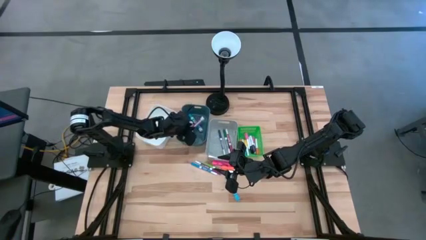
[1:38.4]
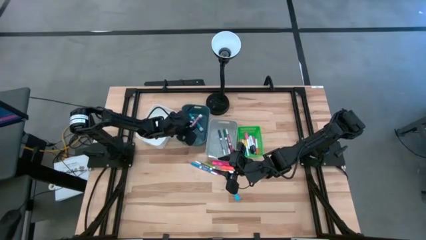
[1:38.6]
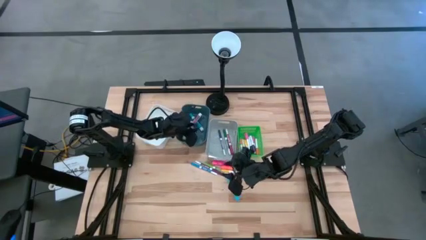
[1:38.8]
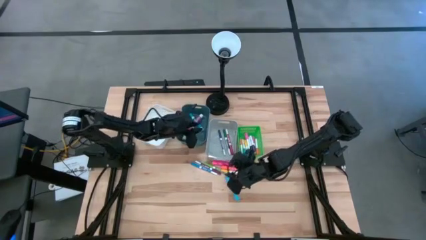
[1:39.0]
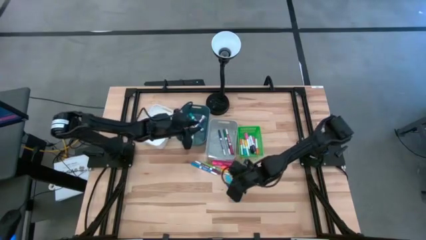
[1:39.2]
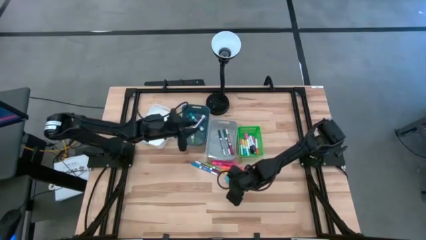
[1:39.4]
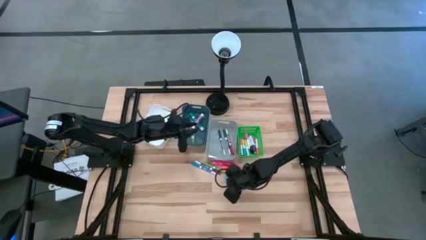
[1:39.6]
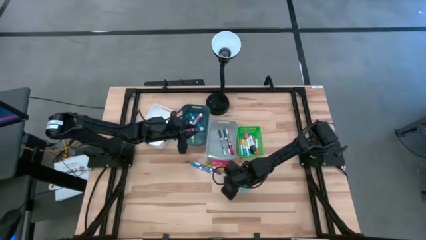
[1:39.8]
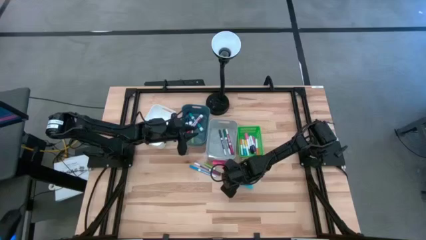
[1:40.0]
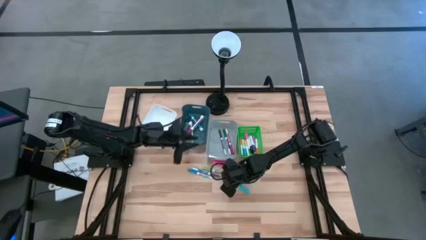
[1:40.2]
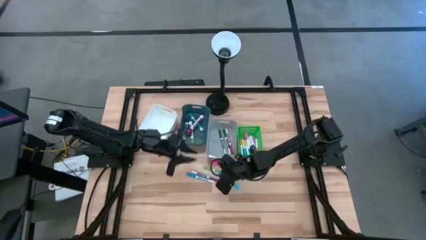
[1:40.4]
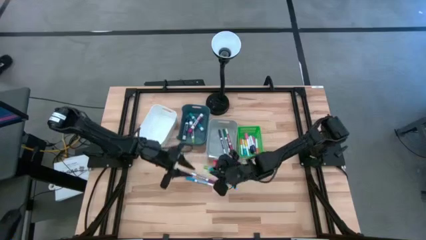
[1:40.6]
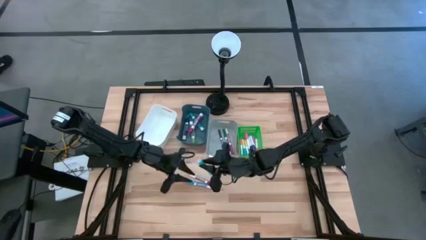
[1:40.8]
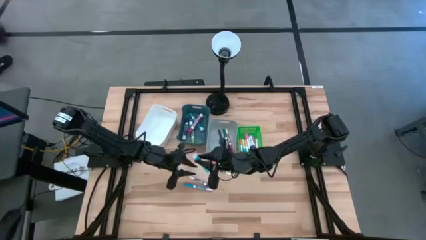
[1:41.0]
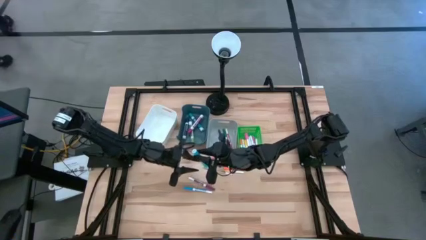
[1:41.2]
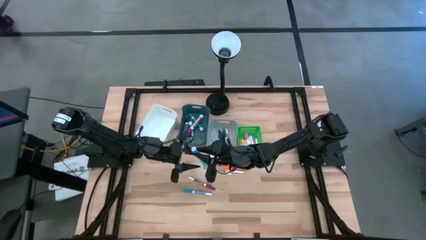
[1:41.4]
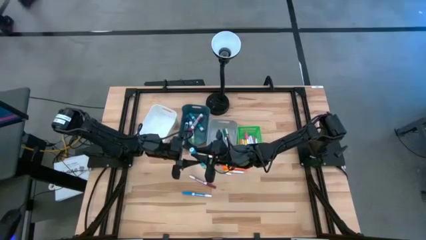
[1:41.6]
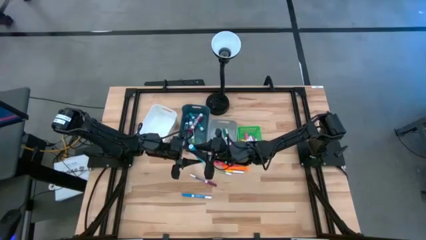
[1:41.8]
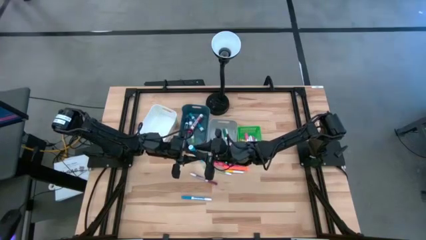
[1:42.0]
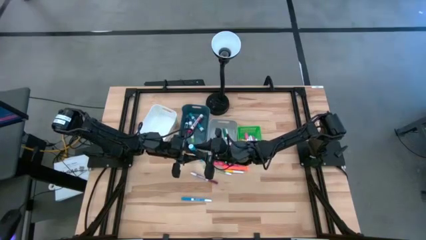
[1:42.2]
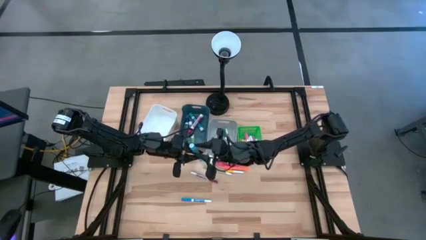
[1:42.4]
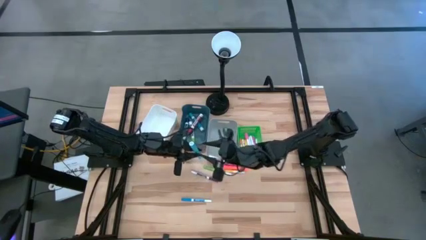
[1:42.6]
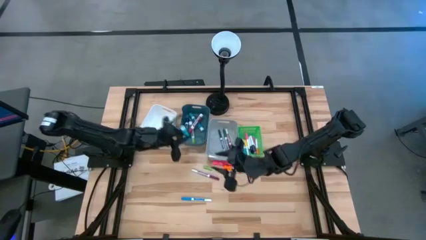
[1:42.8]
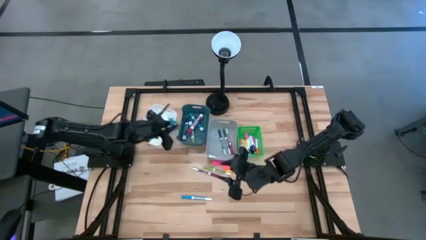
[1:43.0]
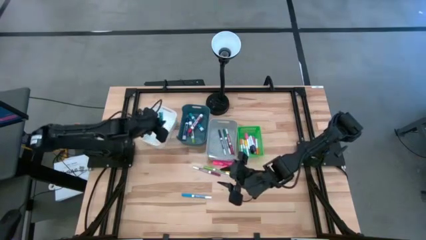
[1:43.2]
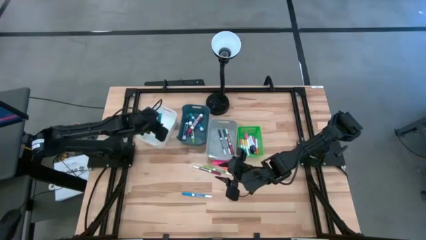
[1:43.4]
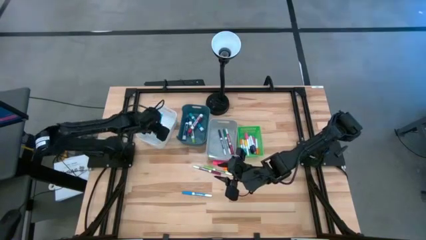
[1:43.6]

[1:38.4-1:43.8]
Task: Pick & Place Markers
Put the large blue highlighter pen into the white bin

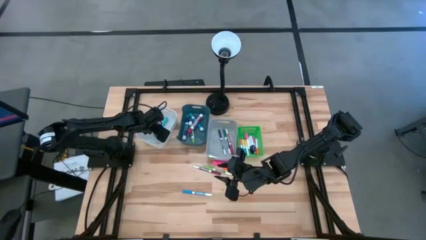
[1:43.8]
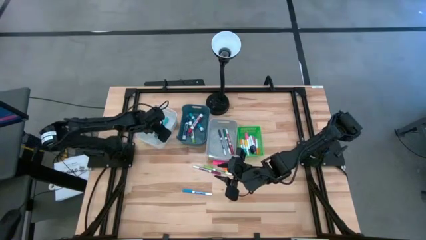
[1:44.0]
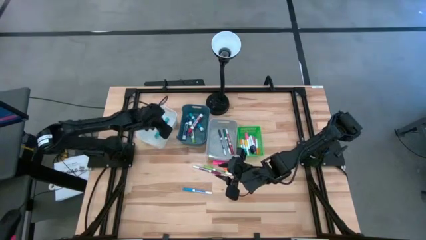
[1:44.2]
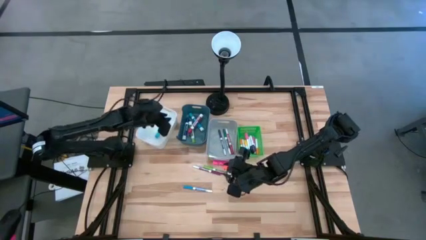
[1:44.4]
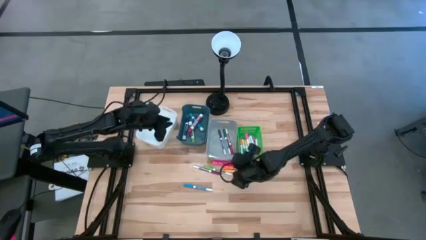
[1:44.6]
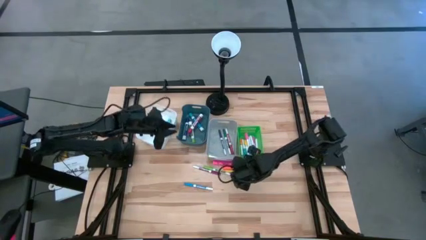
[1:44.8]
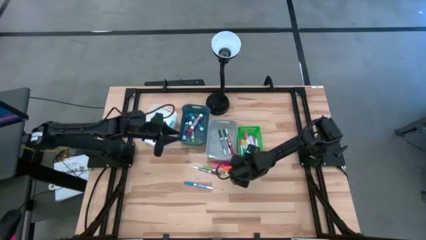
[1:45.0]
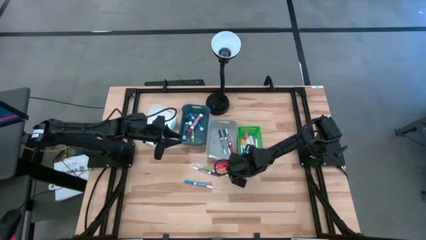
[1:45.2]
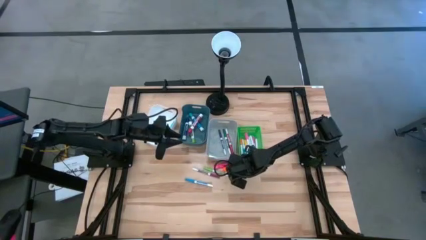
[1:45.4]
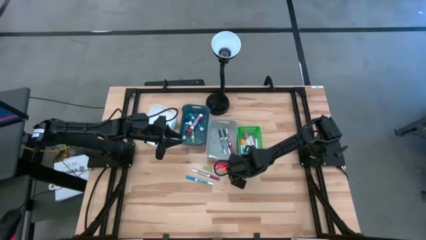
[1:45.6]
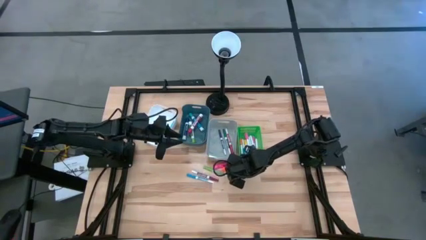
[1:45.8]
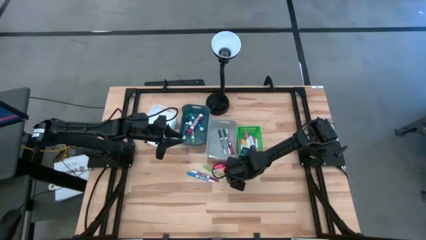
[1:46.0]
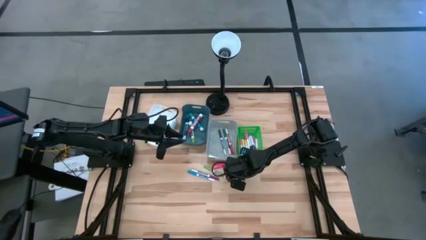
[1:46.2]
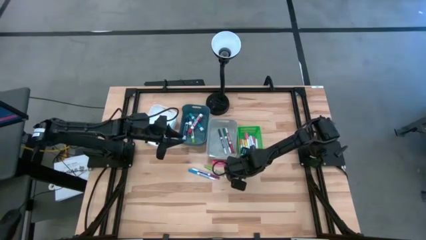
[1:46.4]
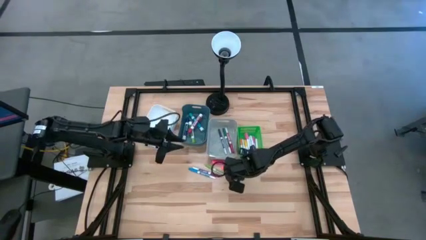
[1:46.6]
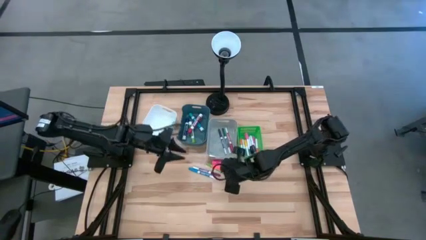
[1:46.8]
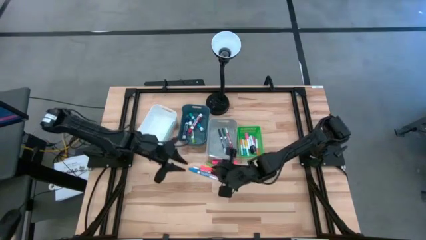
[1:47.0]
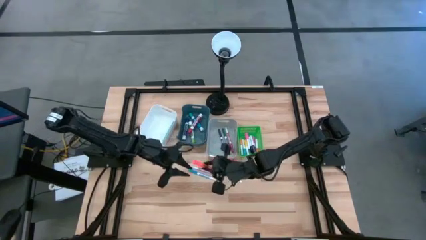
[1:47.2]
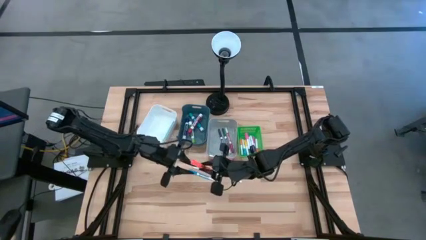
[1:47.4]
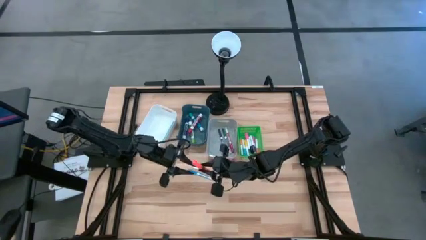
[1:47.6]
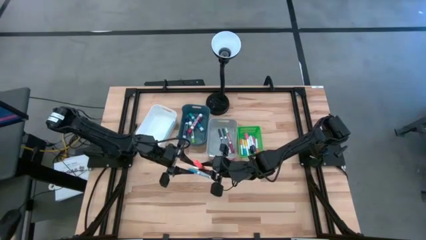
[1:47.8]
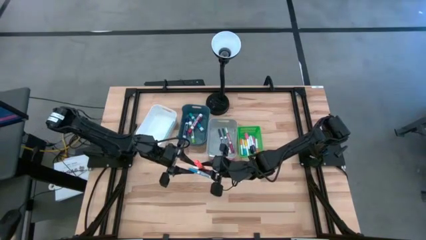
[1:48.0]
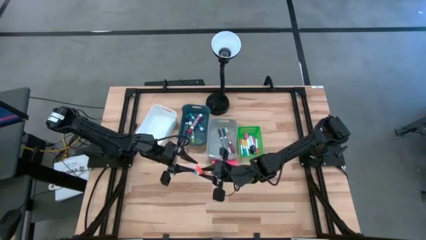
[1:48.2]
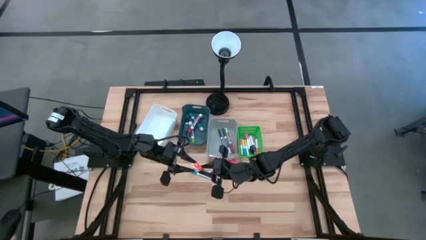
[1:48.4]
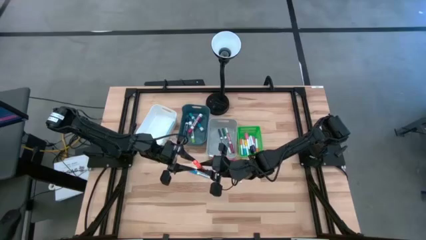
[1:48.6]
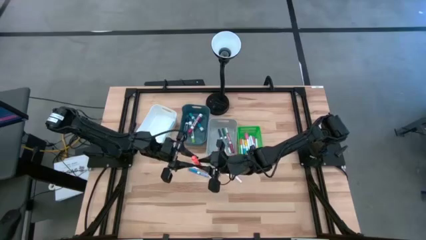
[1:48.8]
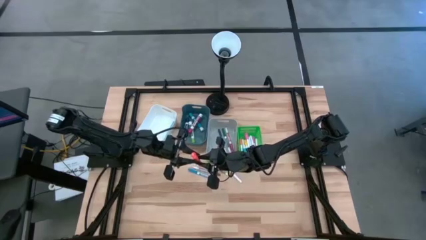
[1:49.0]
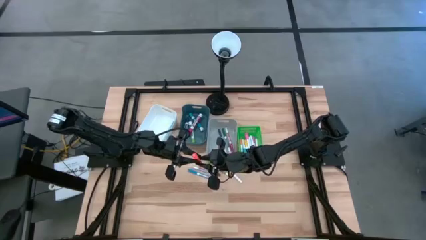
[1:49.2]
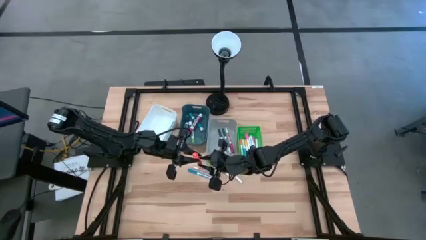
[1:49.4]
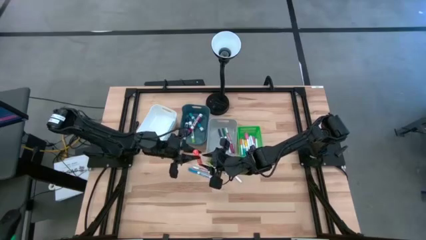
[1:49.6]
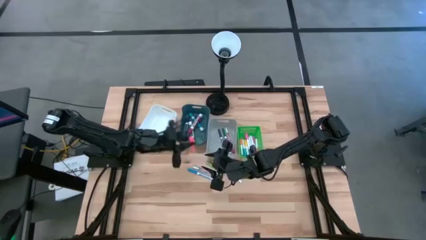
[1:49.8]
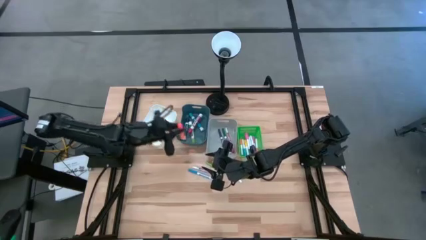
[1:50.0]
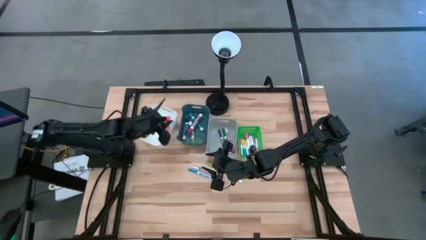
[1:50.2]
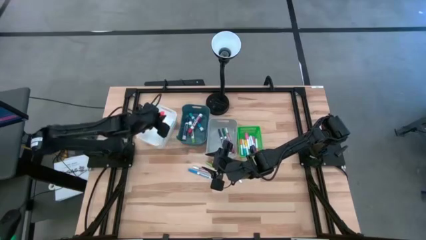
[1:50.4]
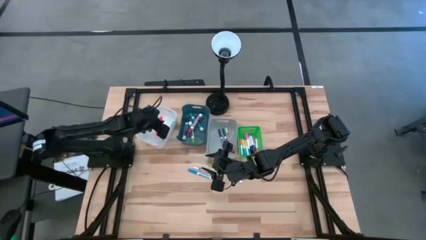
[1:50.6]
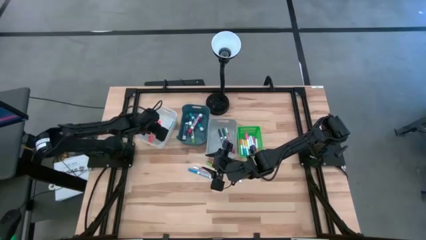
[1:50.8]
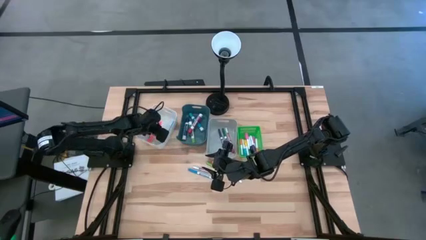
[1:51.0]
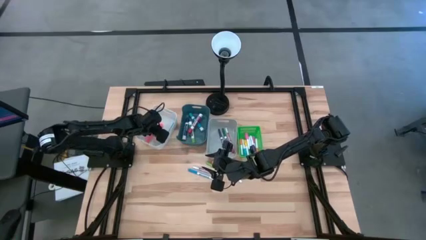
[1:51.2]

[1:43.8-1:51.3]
Put the large orange highlighter pen into the white bin

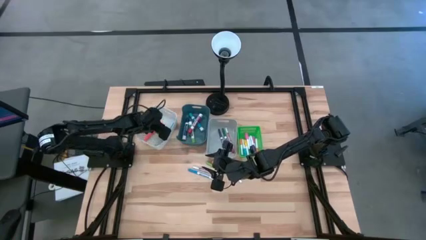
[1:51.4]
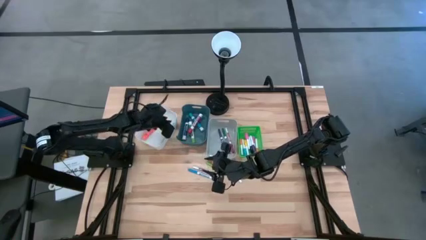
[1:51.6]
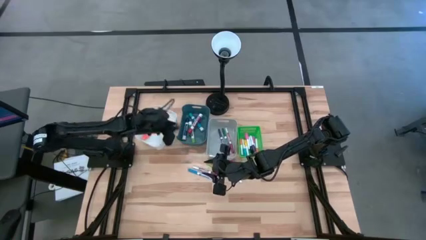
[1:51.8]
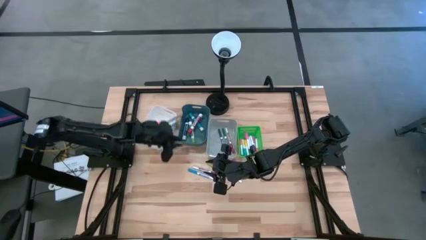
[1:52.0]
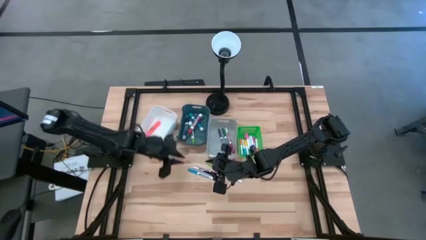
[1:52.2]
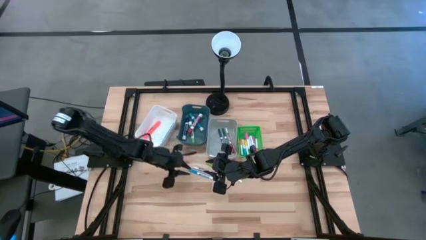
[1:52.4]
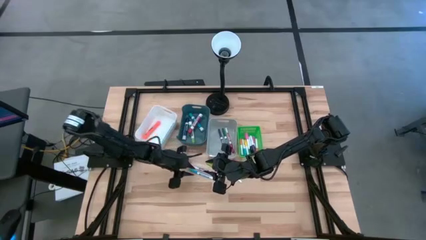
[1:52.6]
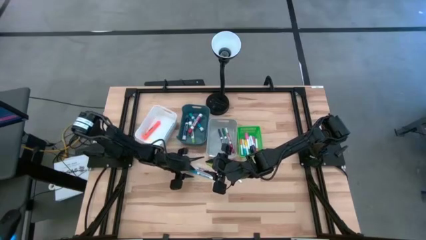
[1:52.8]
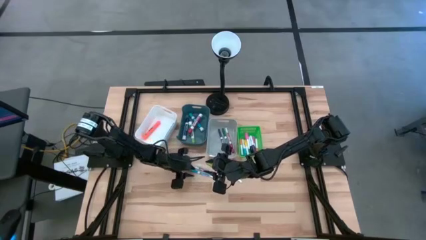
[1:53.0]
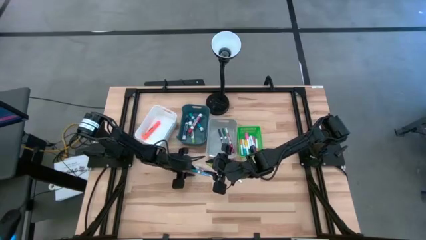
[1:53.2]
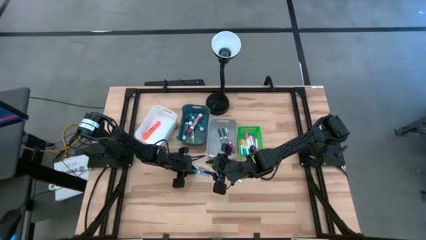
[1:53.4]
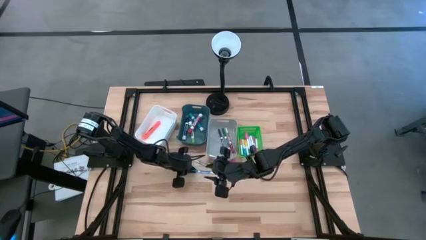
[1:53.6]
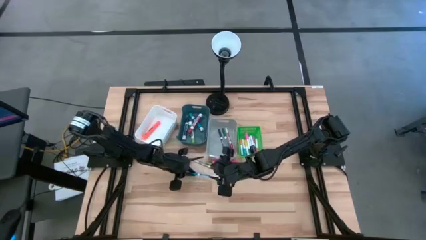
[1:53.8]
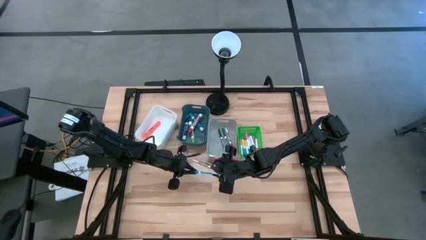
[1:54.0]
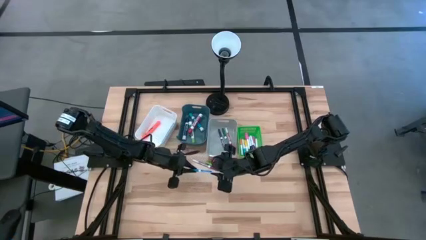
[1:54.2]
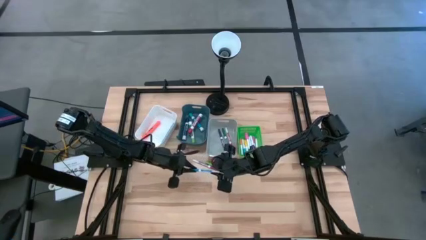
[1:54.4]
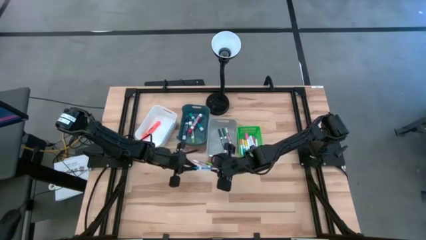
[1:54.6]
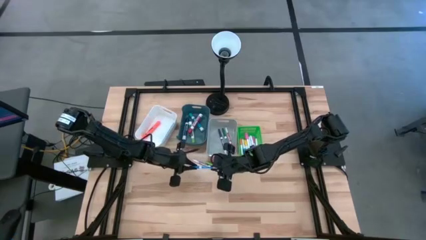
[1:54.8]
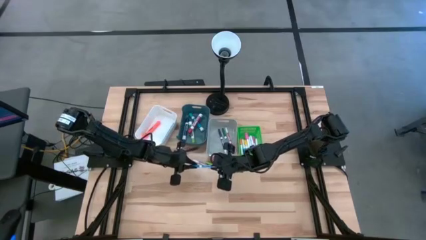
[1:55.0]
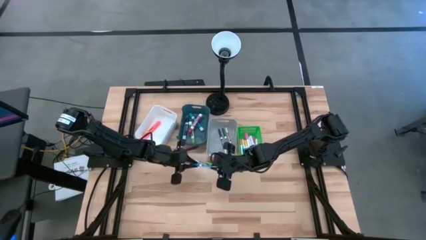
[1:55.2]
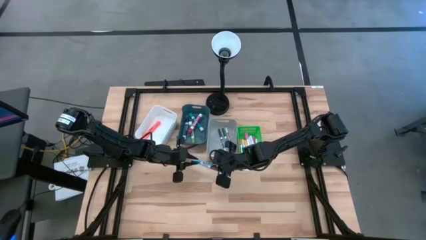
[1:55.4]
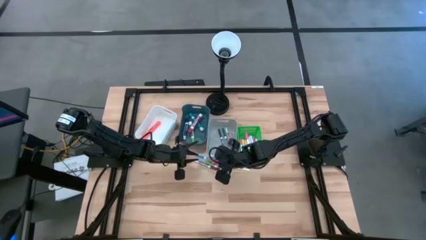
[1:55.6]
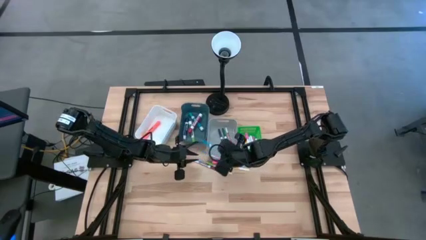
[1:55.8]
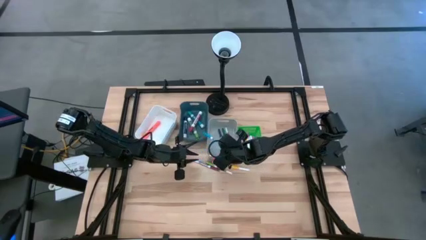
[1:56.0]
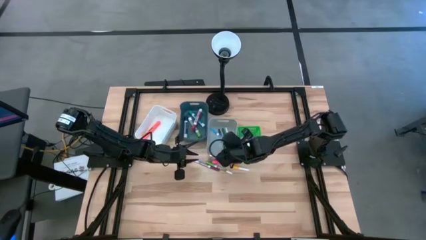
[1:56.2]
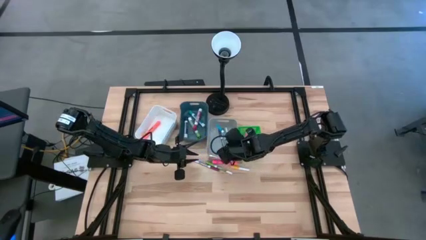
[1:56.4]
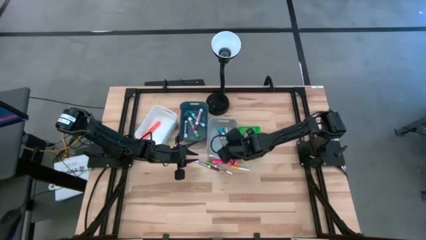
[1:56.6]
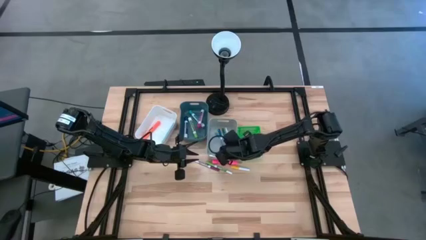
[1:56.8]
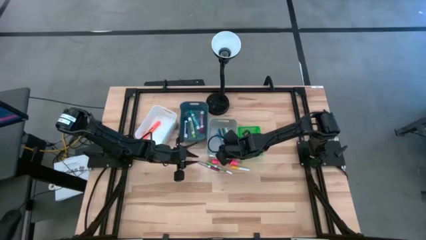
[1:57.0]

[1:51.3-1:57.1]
Put the small blue marker pen into the gray bin
